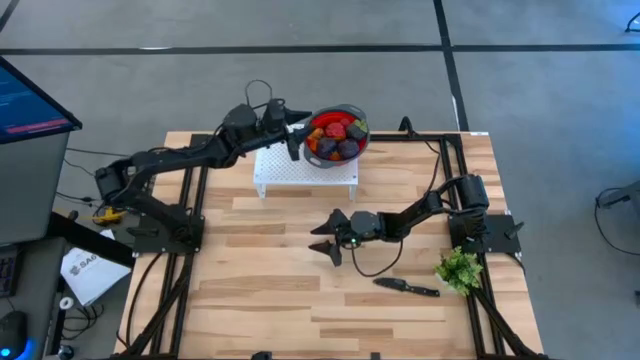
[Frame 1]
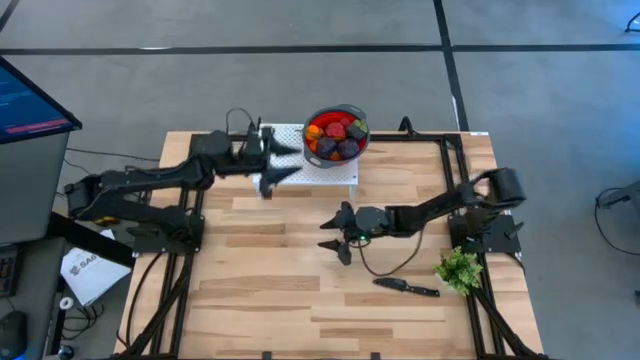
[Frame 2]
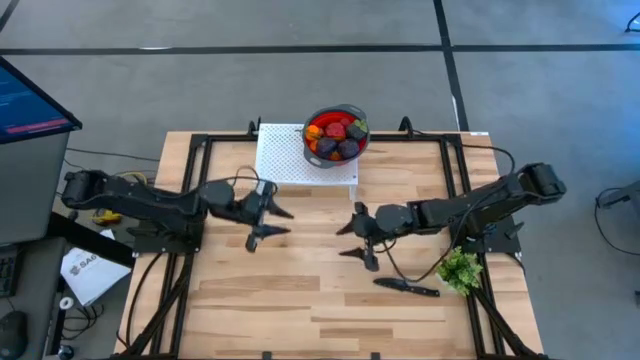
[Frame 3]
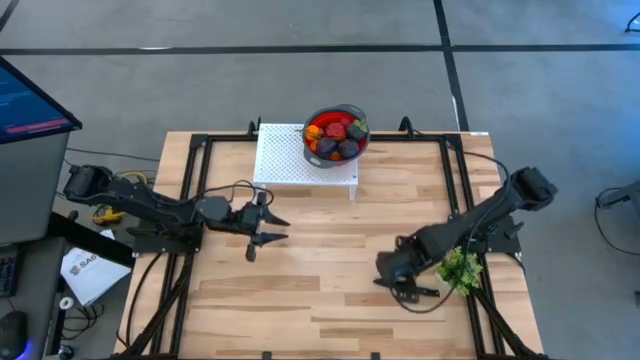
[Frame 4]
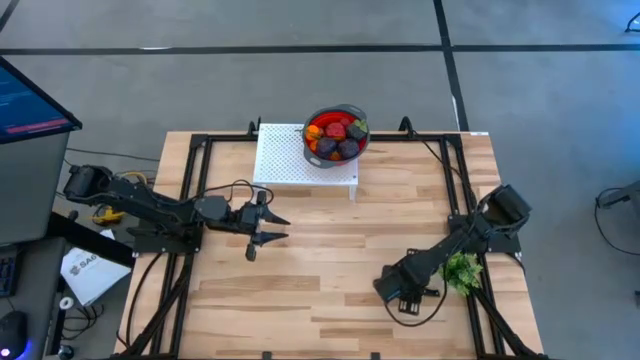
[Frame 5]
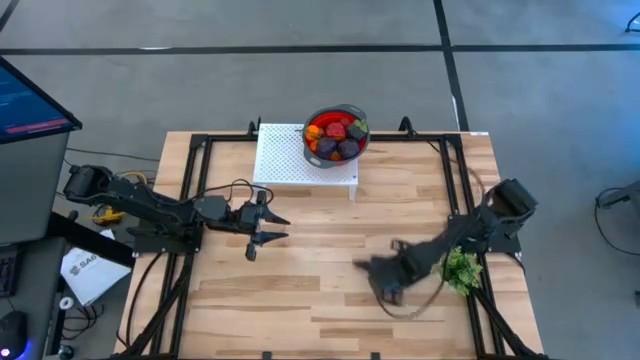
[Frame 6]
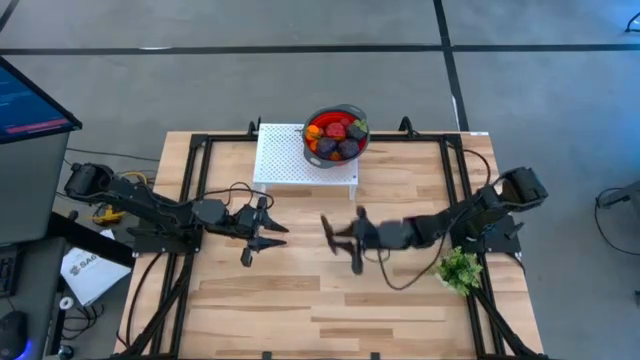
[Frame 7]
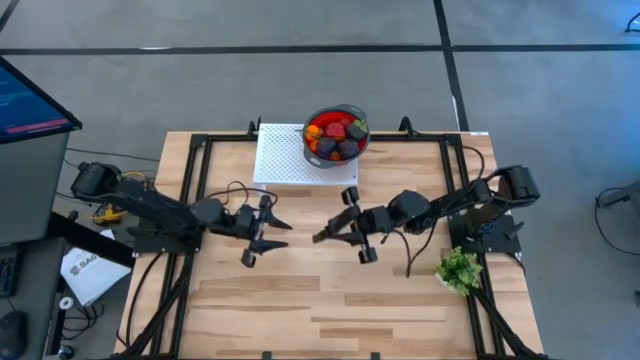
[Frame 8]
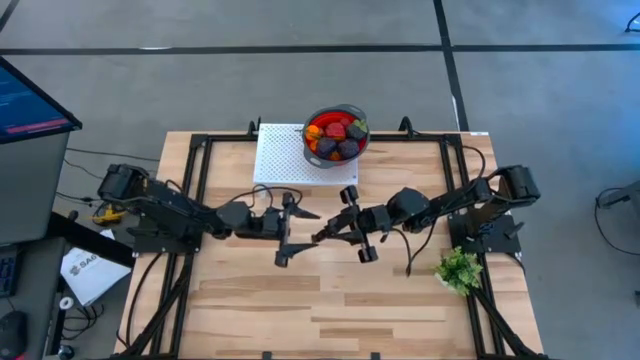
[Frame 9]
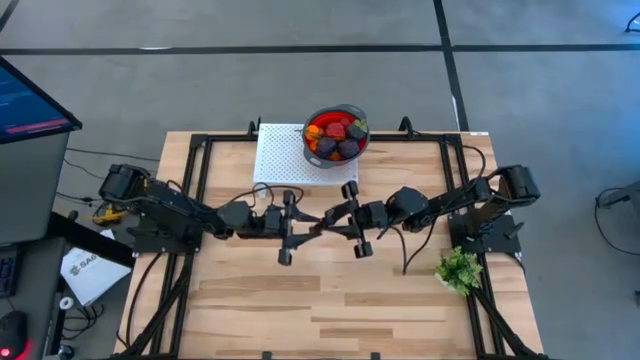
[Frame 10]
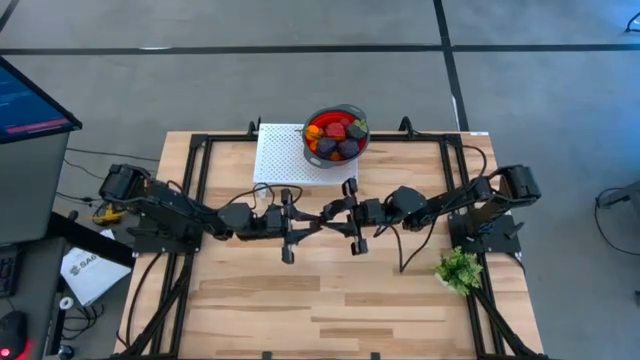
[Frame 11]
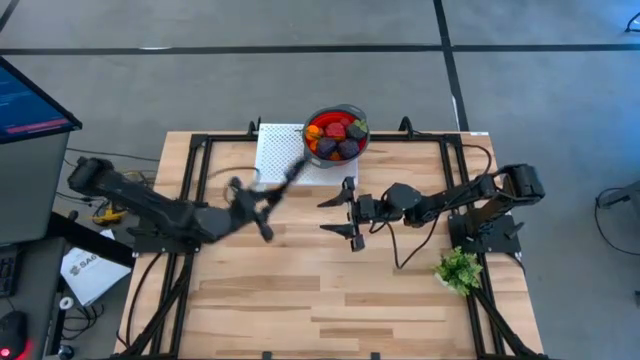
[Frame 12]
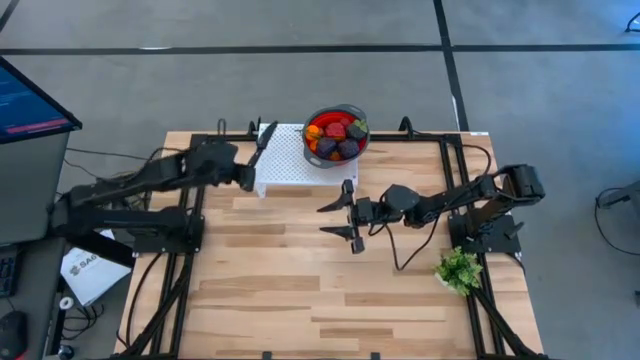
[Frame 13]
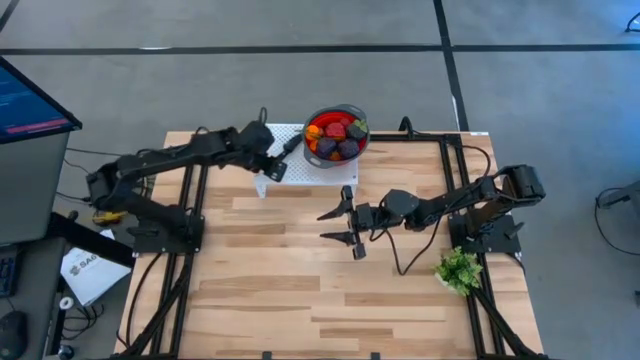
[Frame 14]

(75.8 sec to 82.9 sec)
Task: Pick & Place Fruit
Put the knife on the shelf

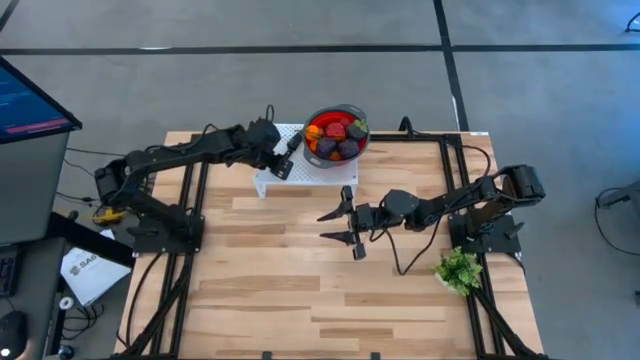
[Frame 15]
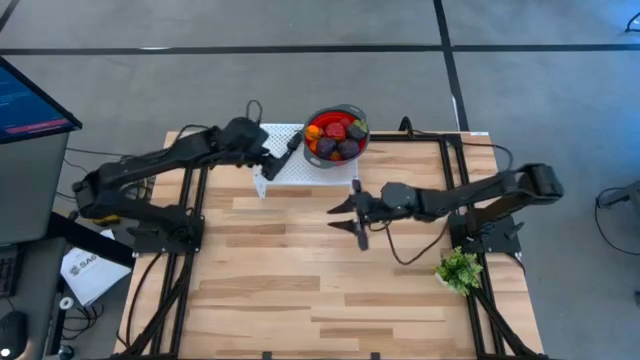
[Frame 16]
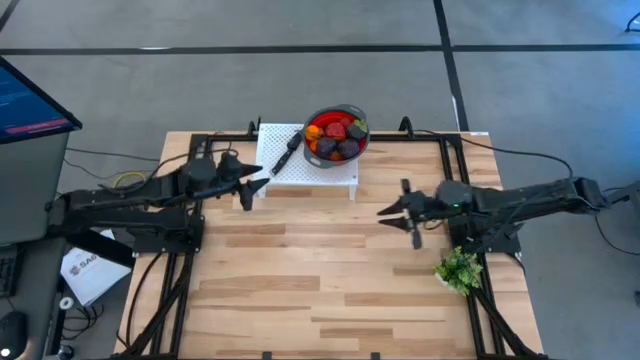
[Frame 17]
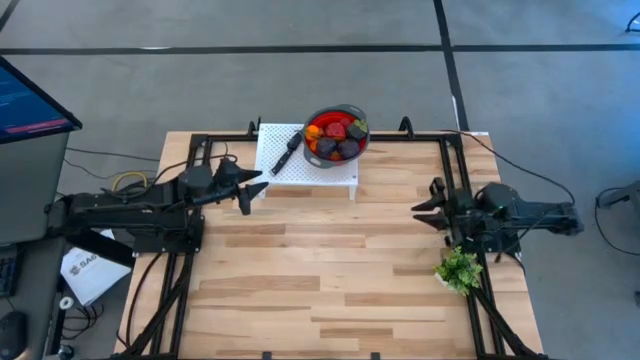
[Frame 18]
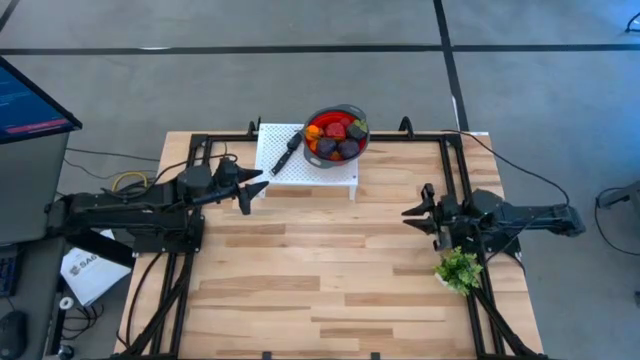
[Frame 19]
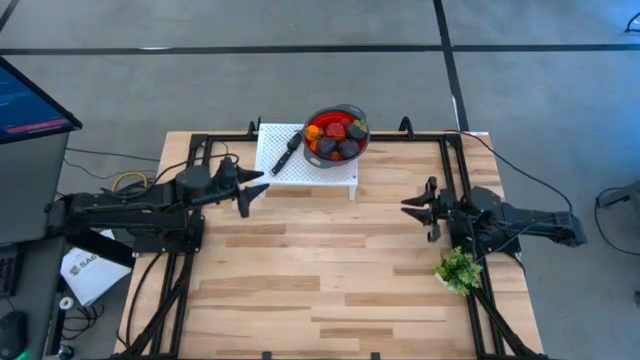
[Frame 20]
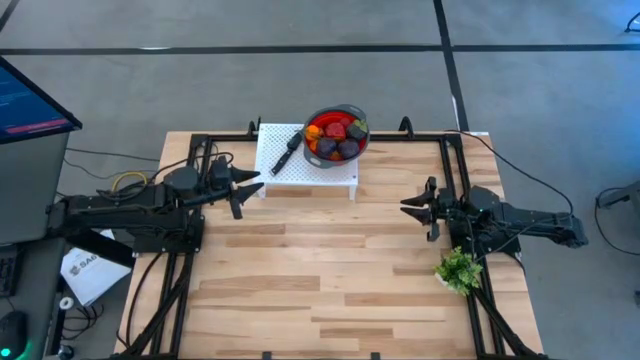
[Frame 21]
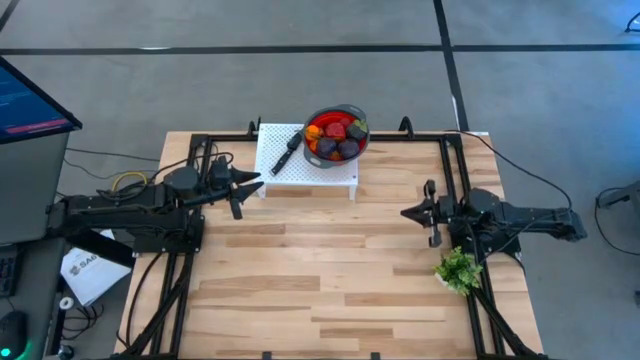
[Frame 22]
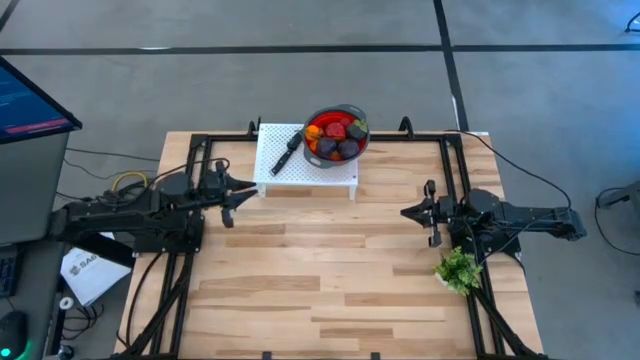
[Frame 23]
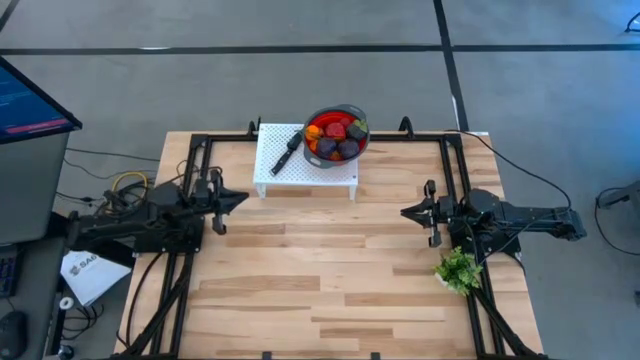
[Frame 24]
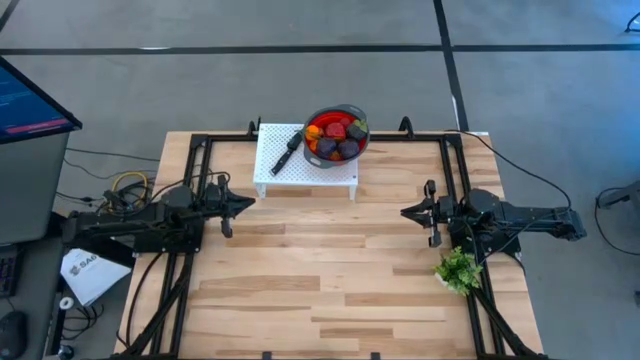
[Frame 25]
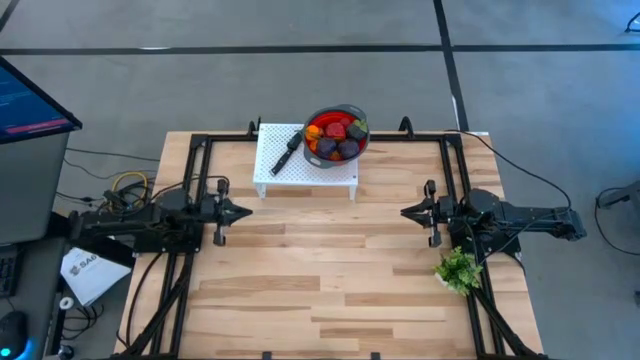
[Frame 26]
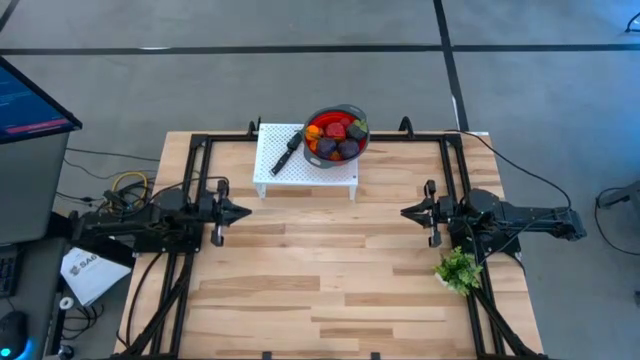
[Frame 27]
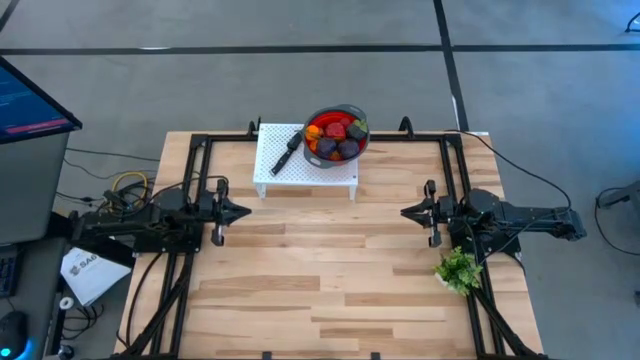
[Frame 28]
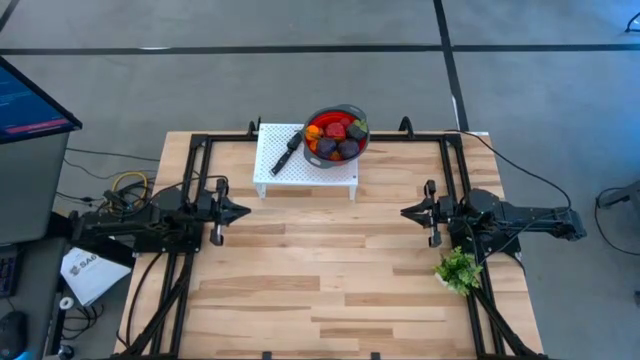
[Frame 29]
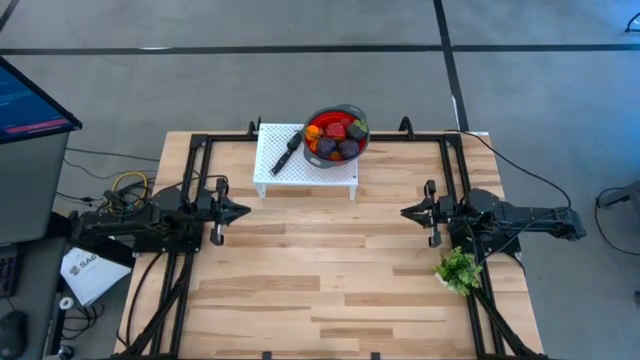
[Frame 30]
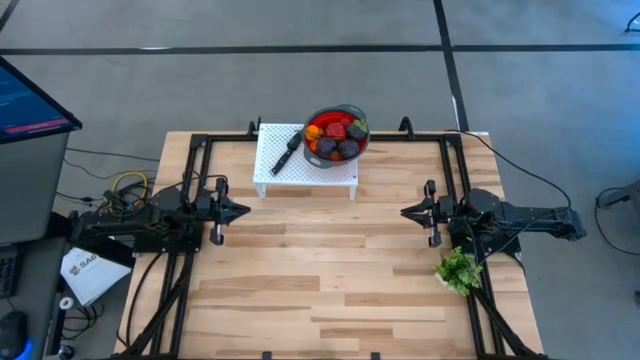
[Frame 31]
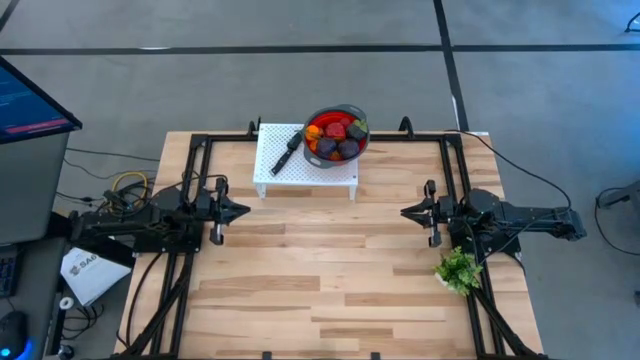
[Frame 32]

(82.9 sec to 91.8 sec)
Return to Home Position

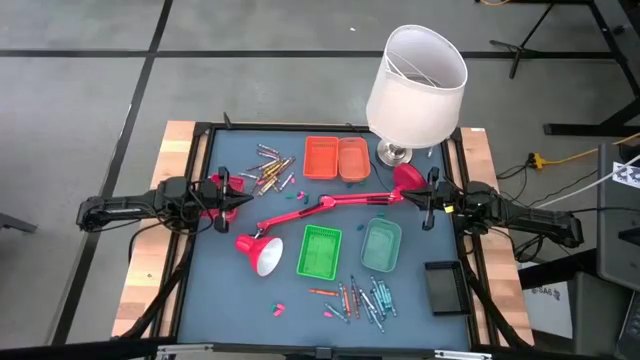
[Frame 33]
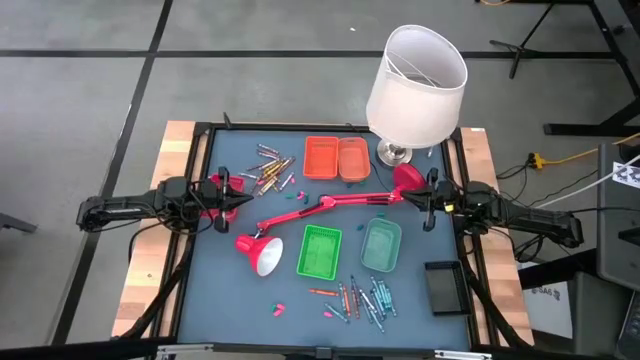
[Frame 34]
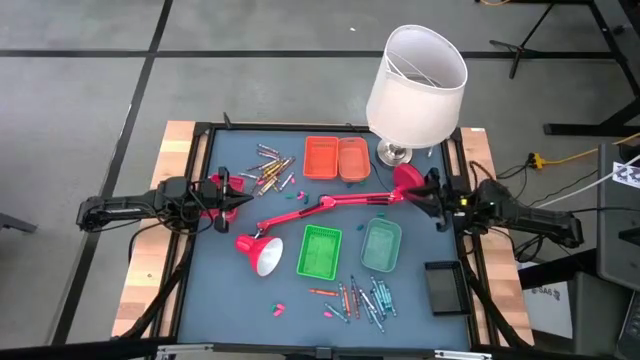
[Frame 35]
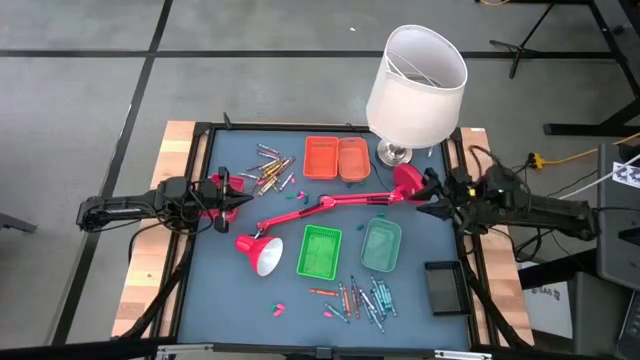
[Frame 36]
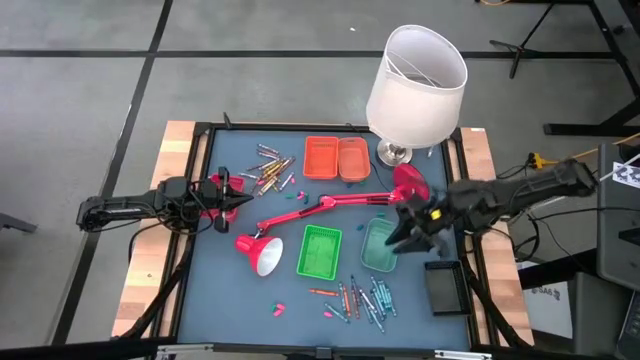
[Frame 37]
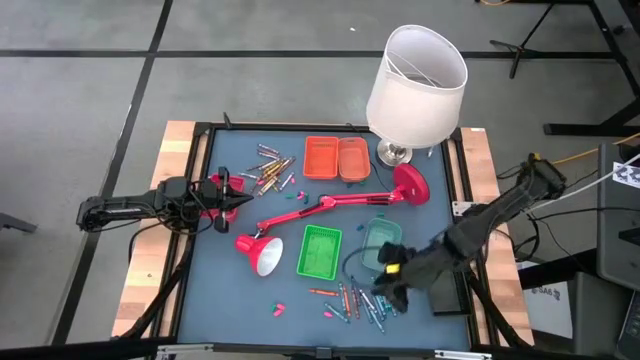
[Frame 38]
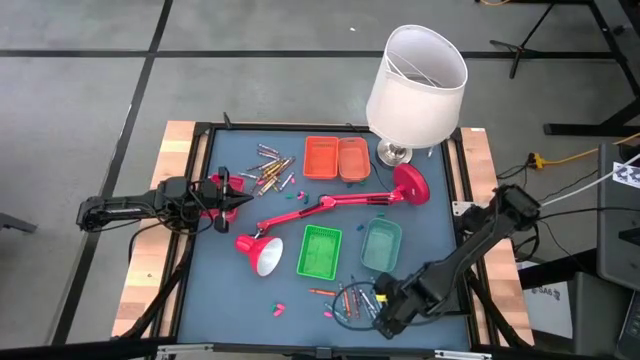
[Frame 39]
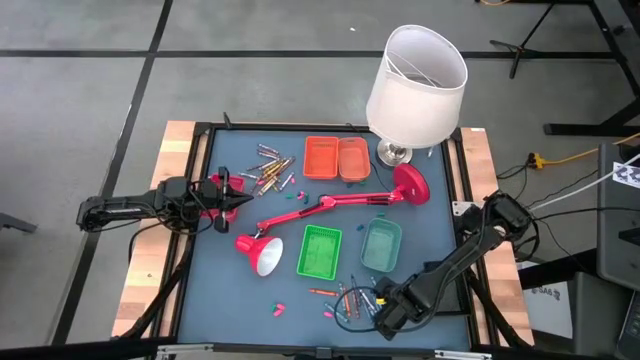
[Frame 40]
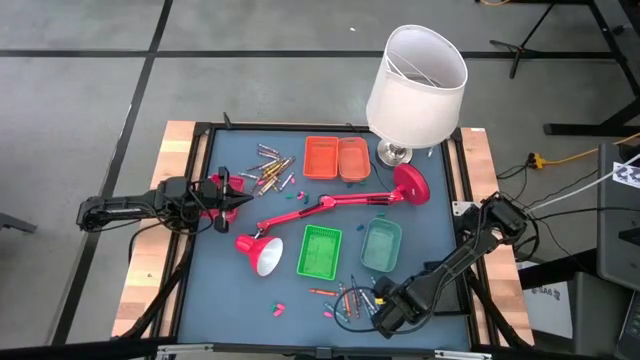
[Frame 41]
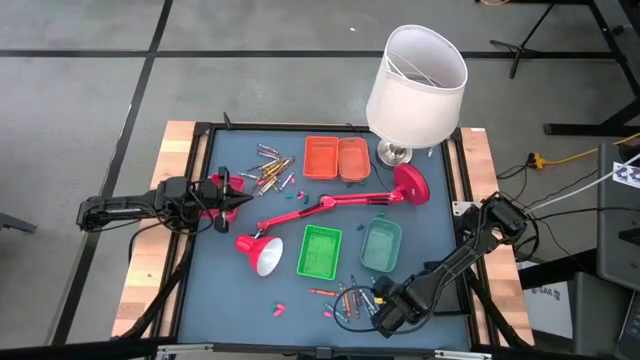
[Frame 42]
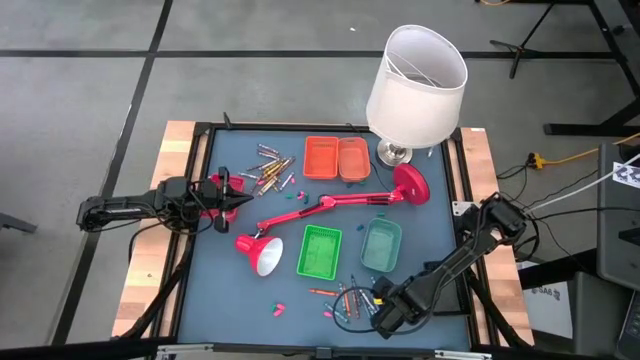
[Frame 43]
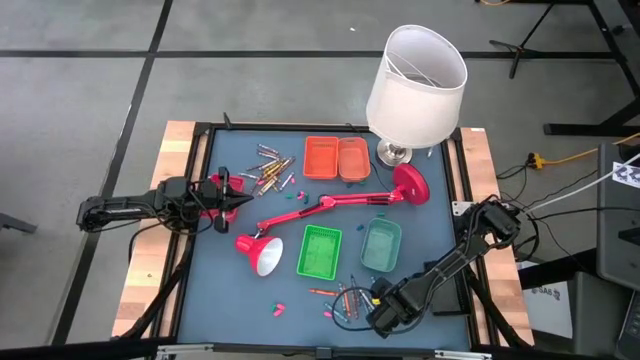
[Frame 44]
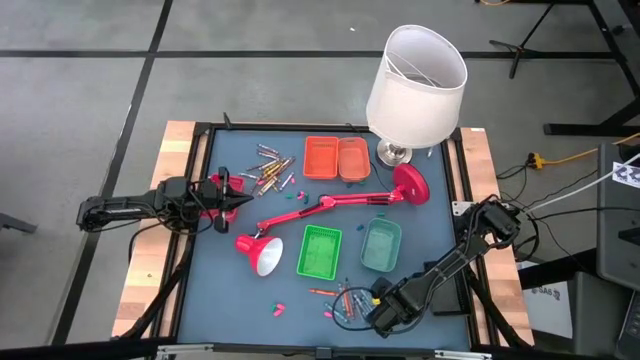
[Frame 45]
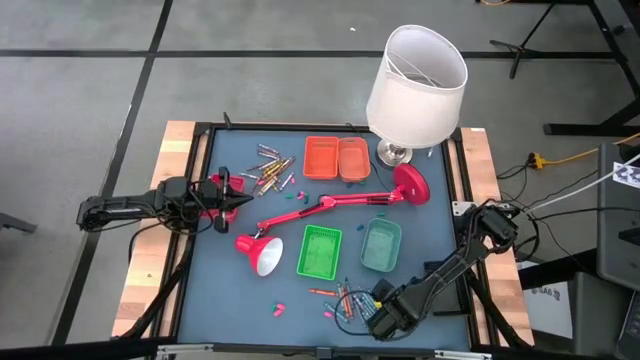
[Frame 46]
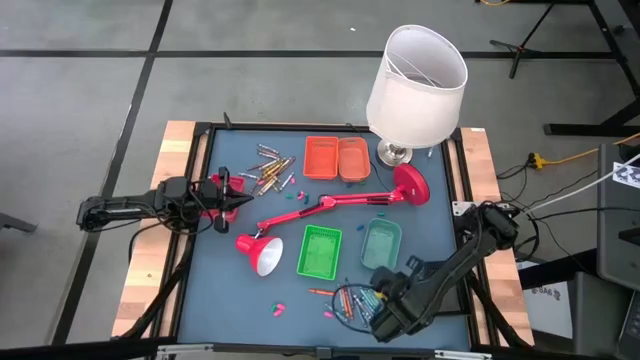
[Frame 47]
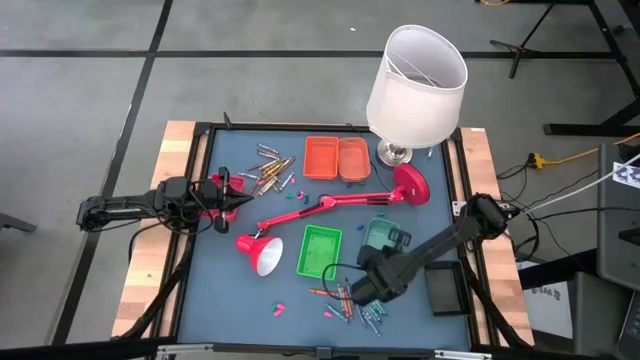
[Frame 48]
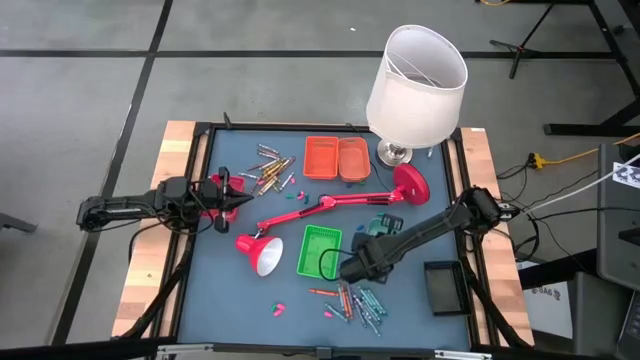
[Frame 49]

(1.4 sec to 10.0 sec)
Task: Sort crayons
Put the green crayon into the light green bin
